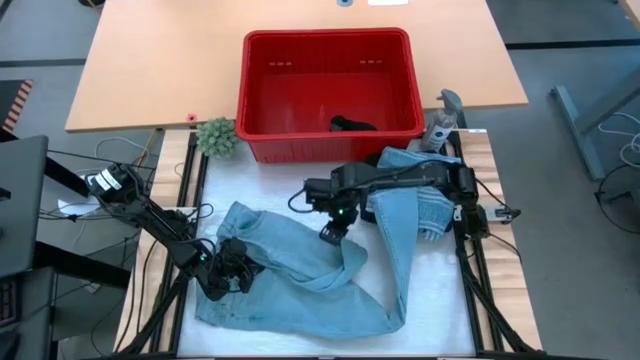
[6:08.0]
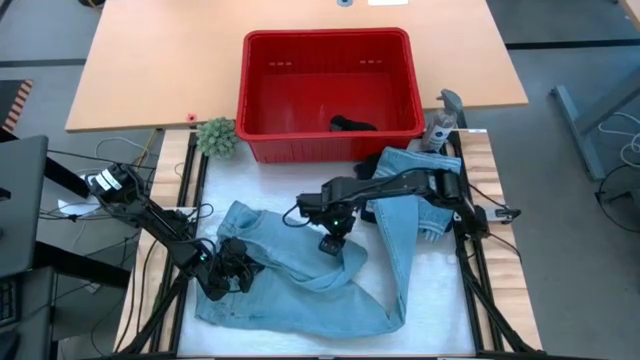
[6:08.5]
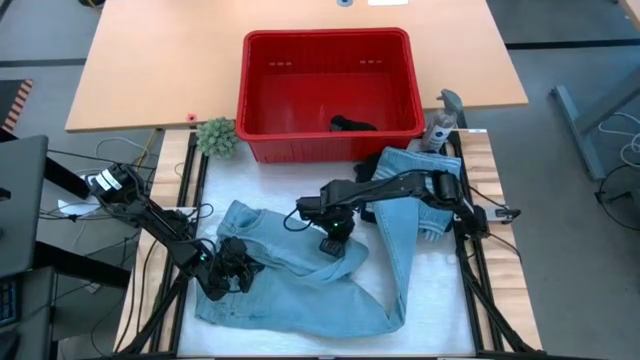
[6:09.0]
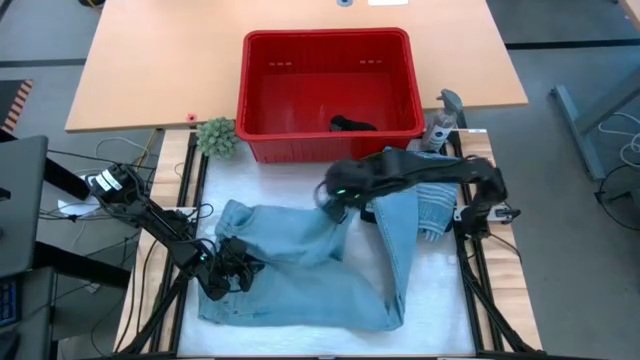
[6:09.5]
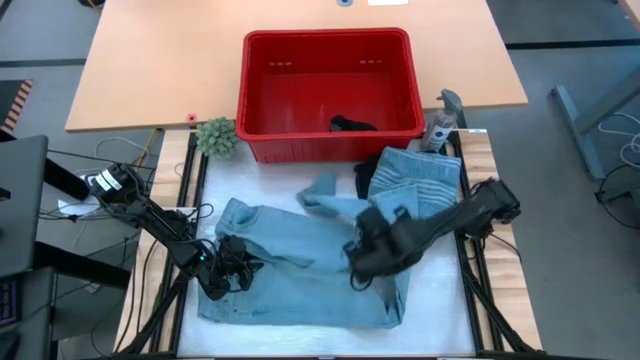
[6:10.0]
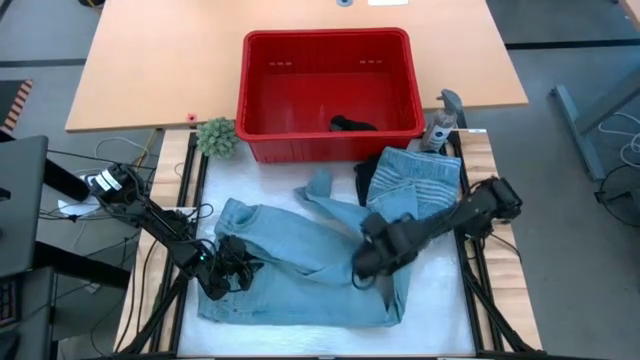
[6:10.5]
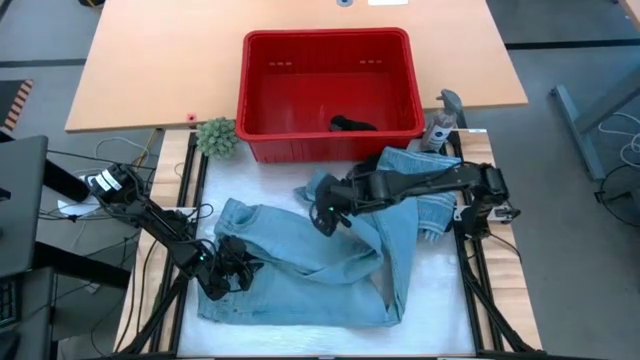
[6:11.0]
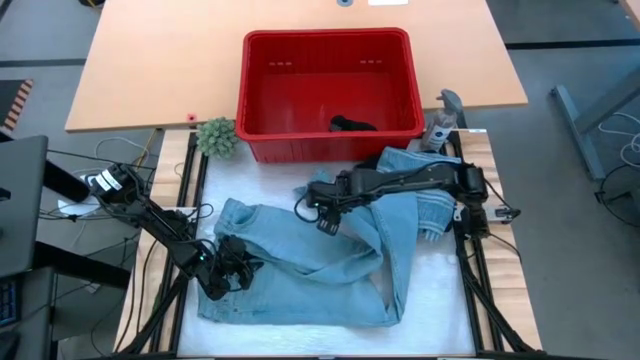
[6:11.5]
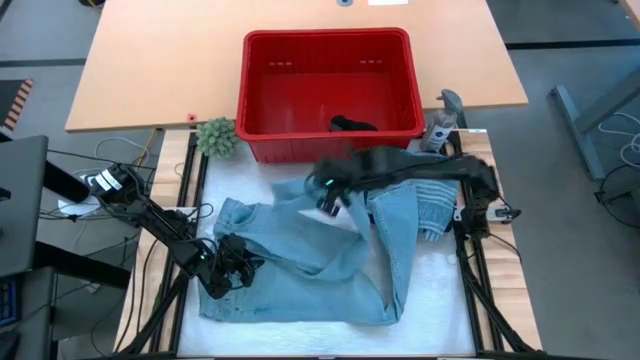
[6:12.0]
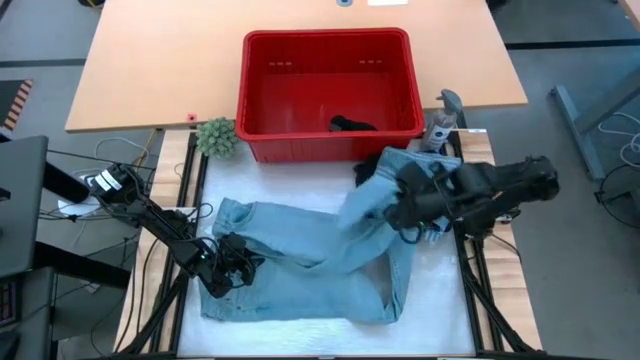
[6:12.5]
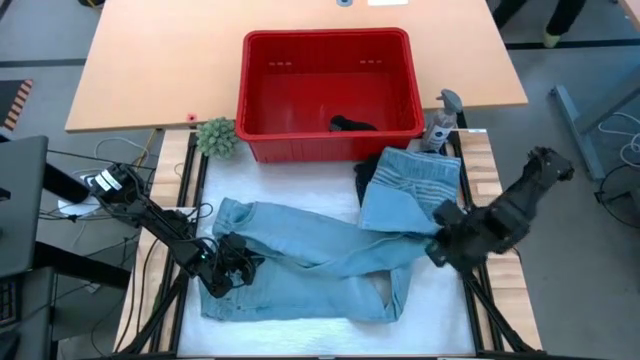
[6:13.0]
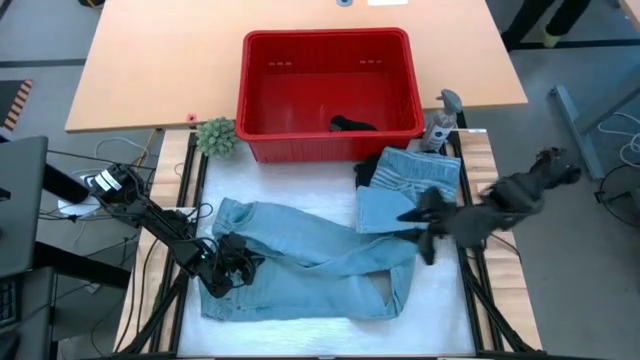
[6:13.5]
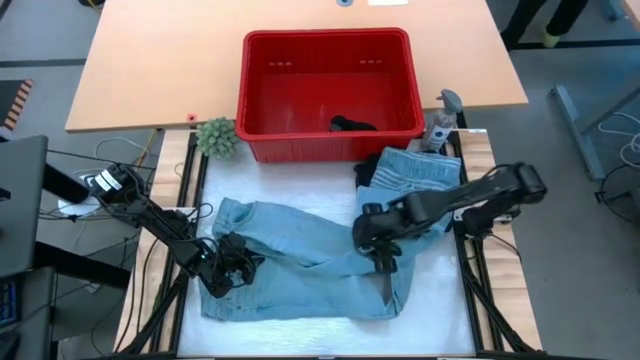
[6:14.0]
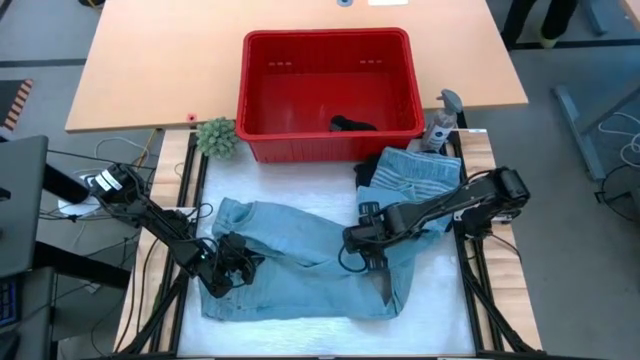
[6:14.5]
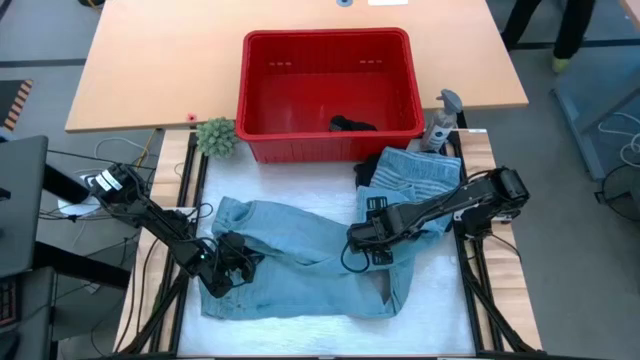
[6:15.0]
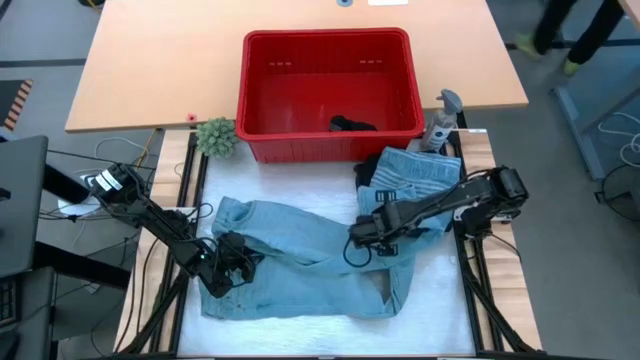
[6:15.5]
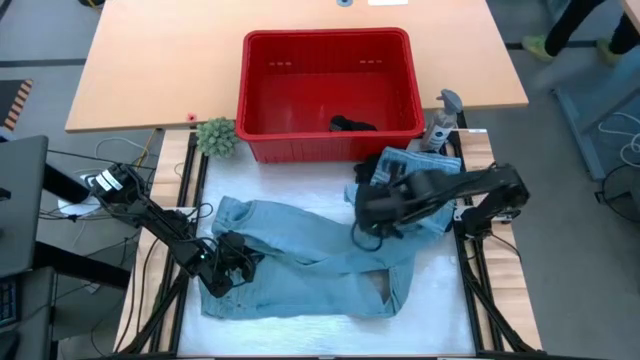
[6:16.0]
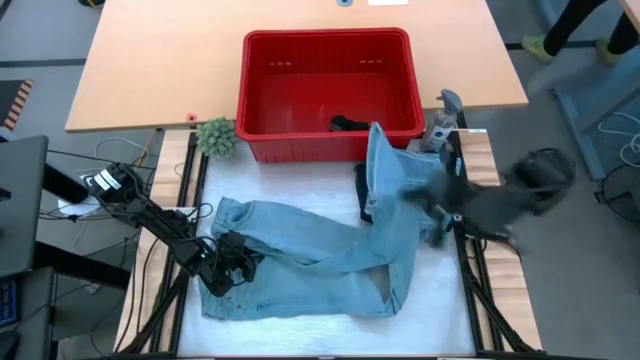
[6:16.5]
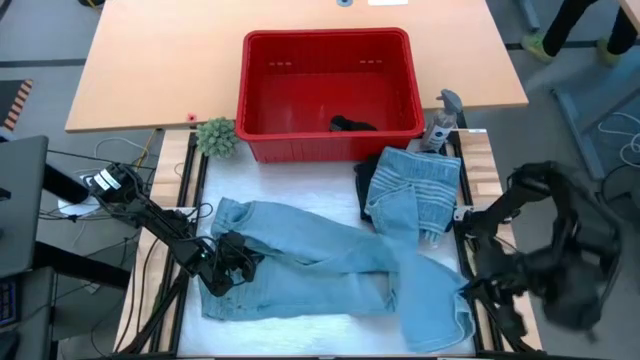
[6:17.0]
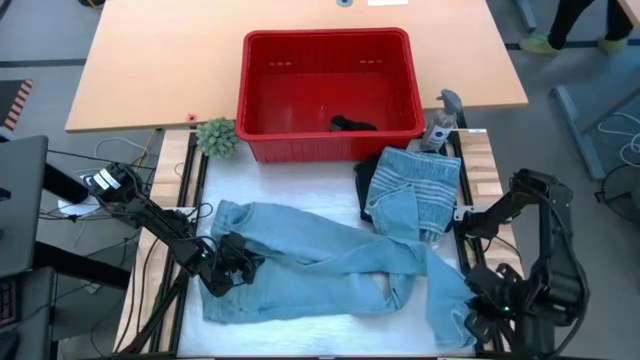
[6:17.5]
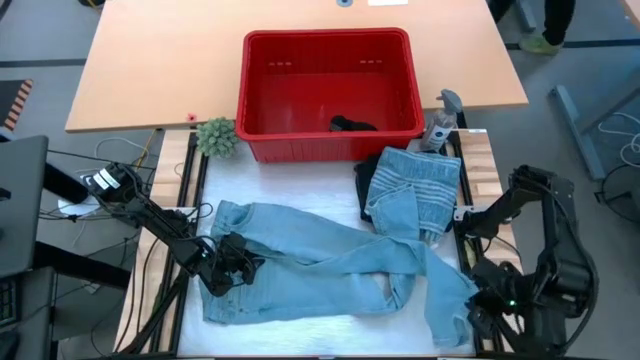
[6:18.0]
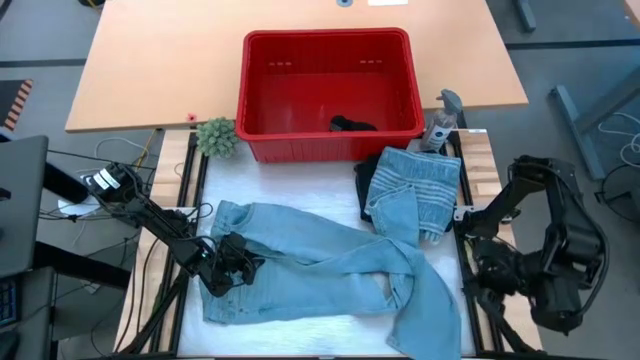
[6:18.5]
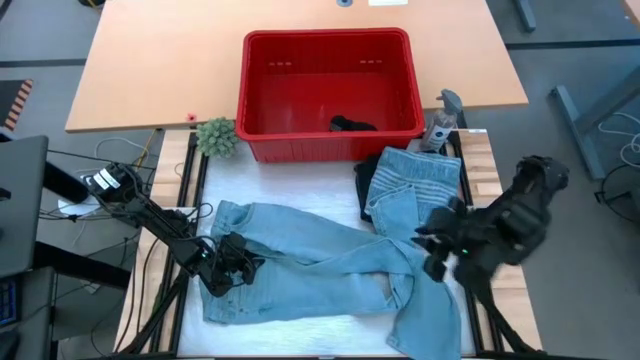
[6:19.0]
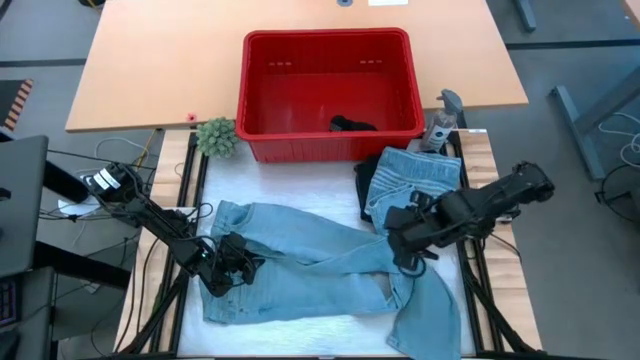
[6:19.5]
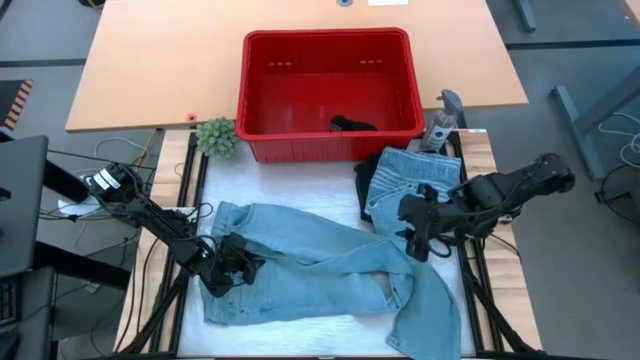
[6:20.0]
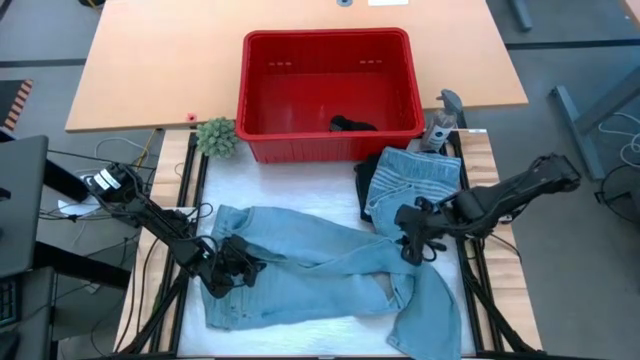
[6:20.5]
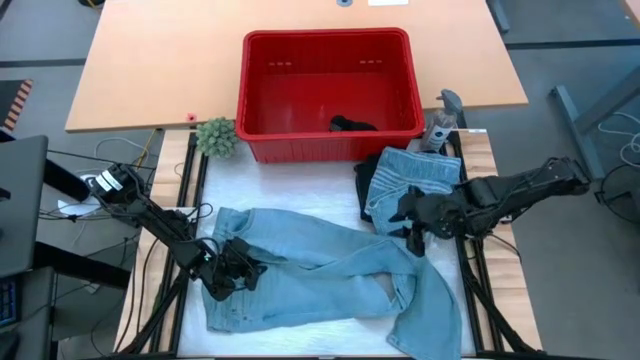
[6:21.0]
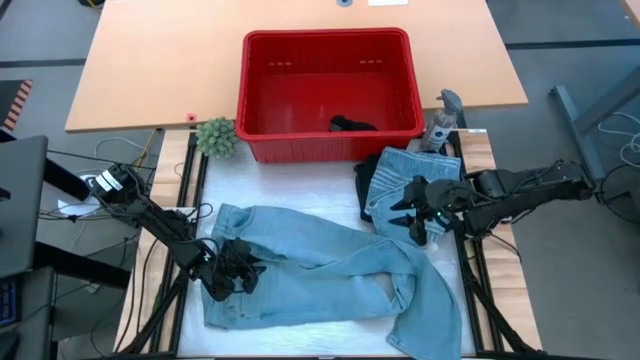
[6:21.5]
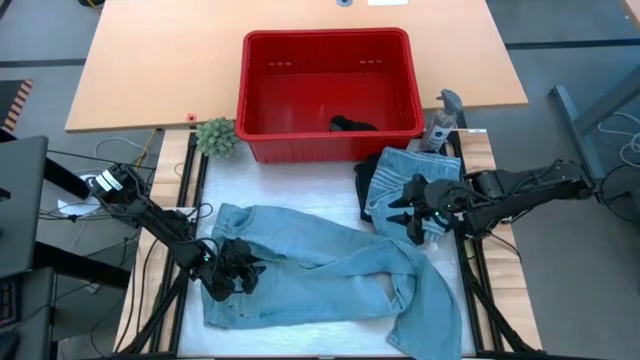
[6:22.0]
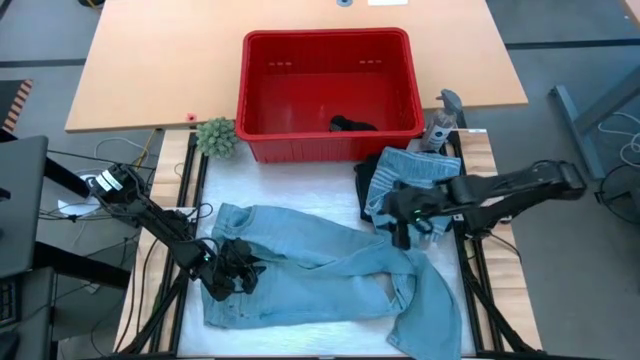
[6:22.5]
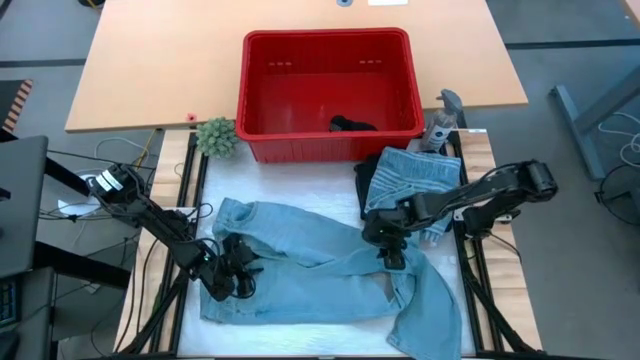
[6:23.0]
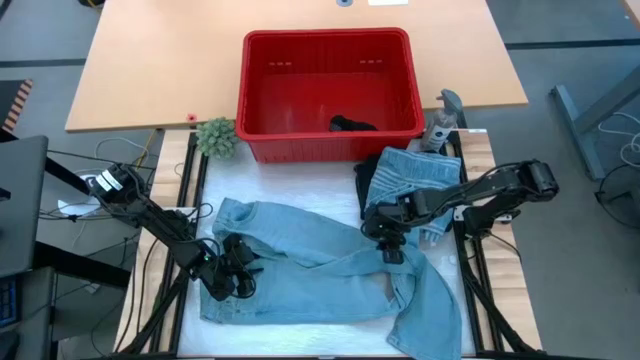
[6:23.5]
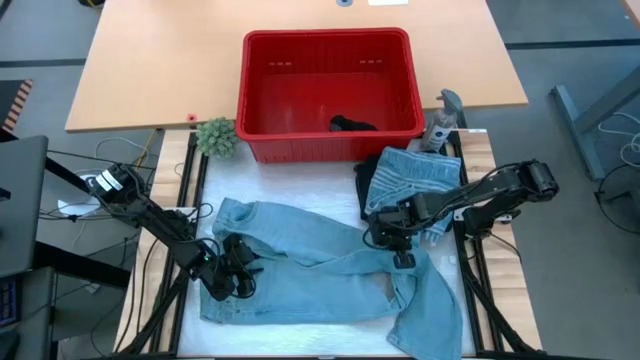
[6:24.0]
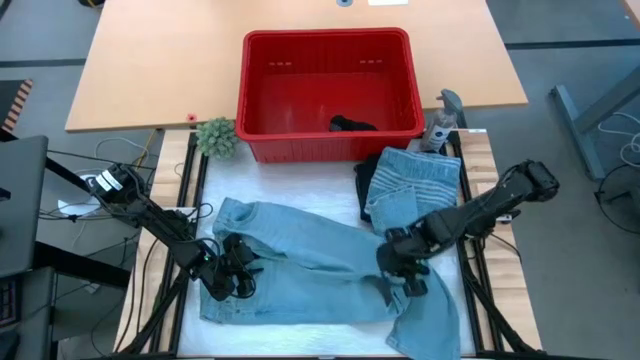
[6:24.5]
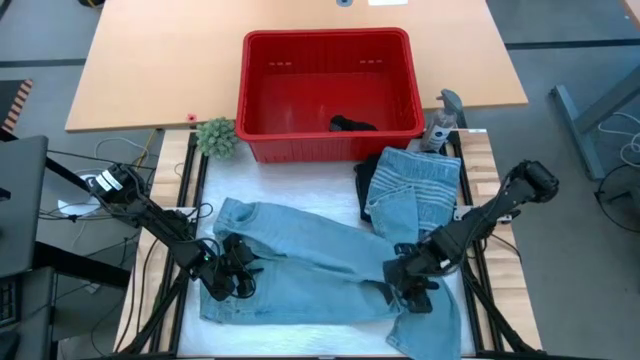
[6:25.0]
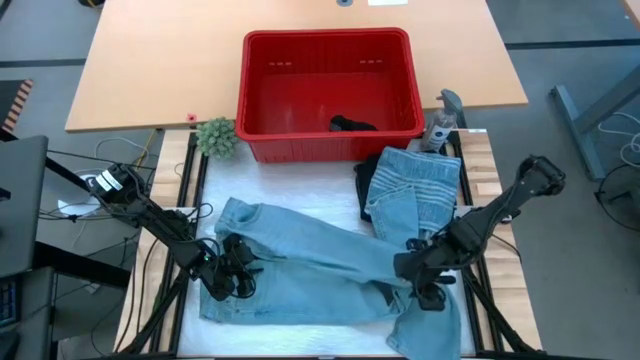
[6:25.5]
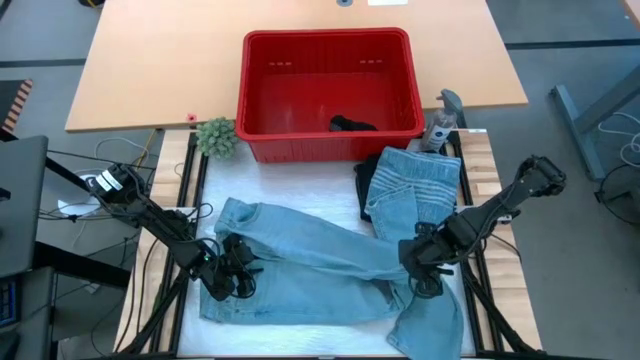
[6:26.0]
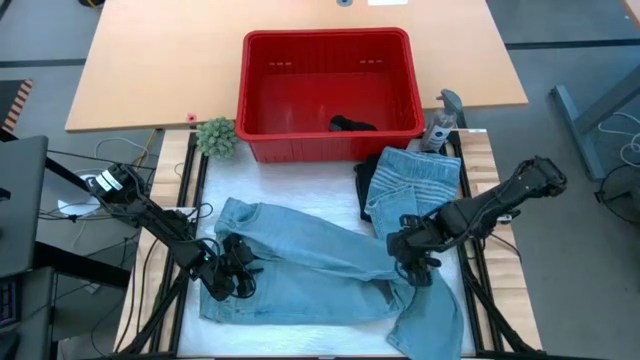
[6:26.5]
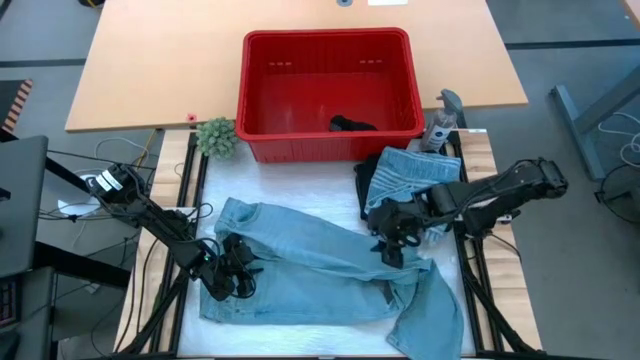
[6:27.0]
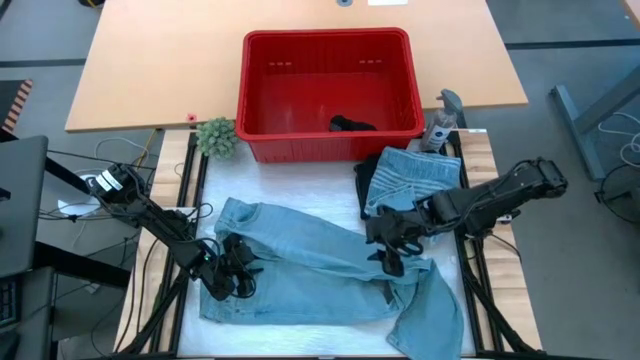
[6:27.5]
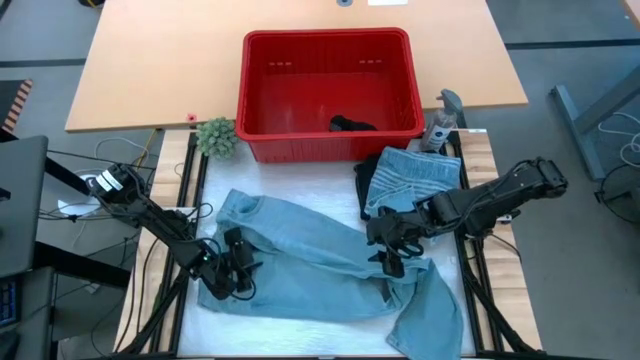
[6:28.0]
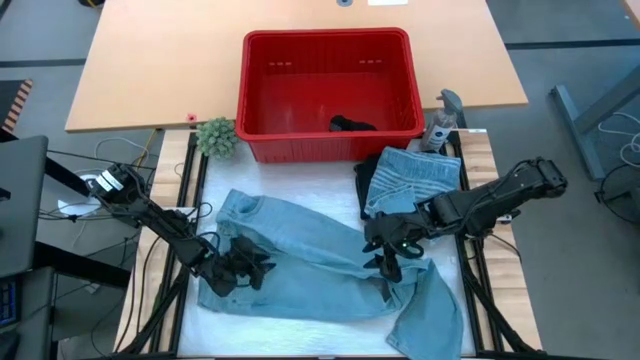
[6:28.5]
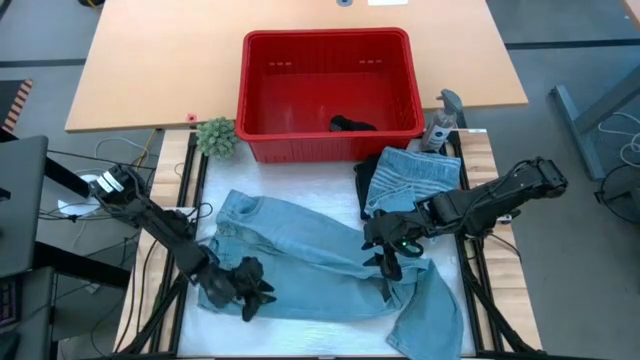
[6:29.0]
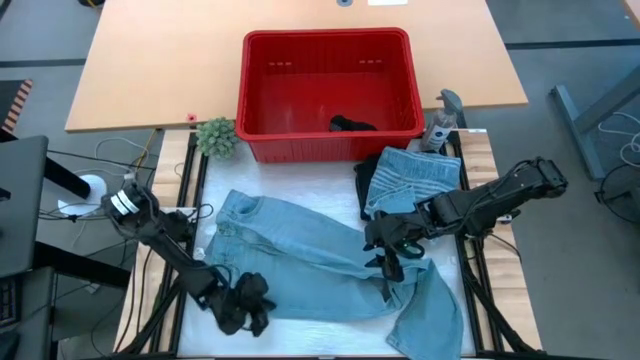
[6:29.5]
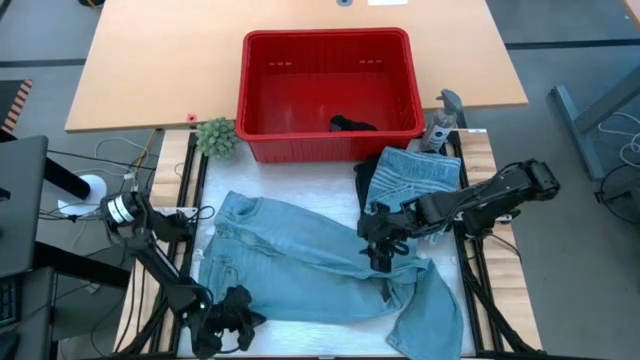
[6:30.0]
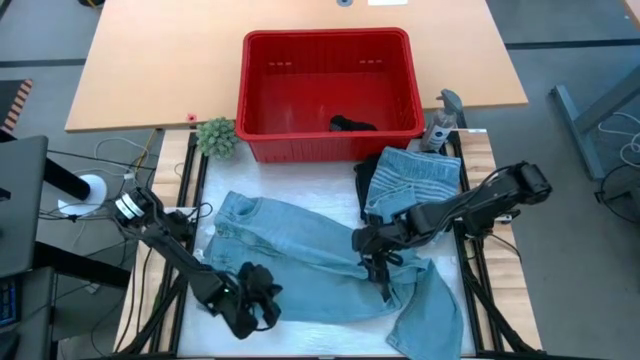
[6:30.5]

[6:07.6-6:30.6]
Task: Fold Laundry from Bin
Fold the blue pants
